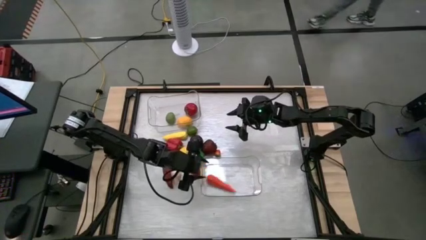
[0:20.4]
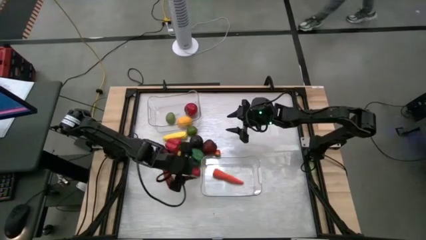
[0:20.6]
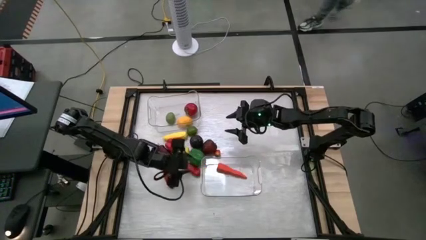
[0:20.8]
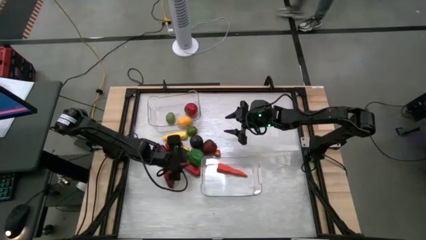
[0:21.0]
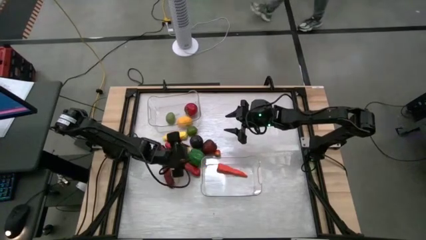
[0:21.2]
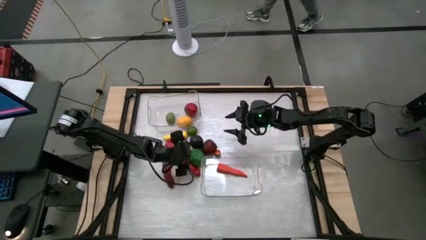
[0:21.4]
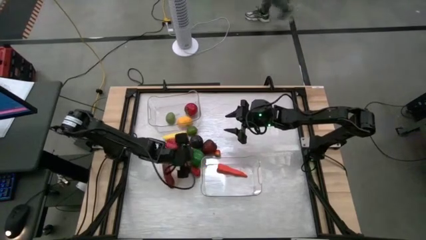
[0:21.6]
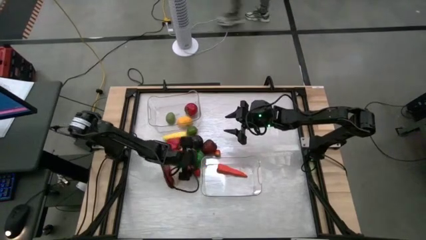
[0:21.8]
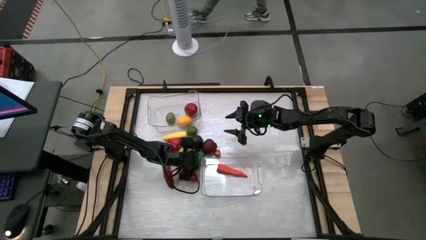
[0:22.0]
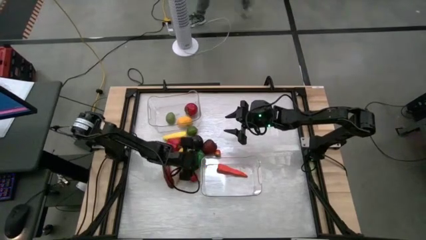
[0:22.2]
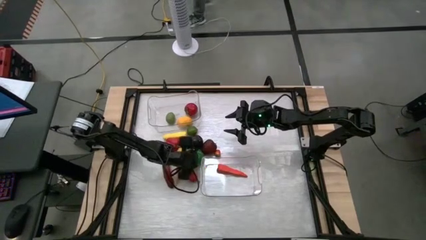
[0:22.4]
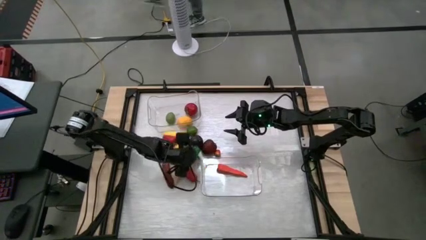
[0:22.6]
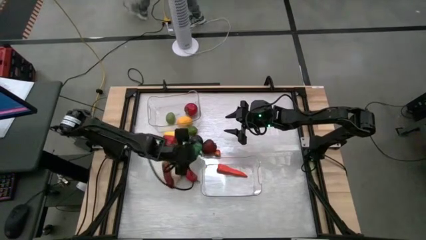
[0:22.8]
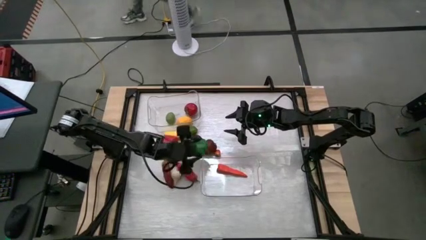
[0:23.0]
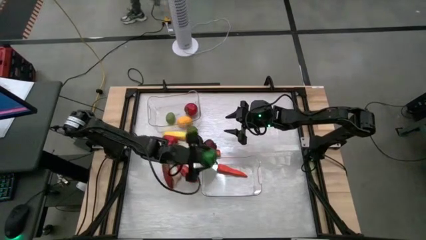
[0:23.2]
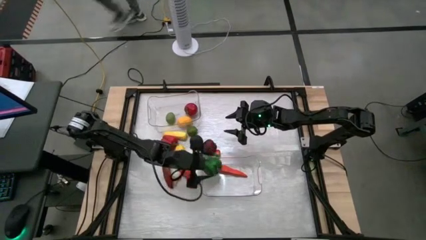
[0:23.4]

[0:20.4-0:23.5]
Task: Sort produce into baskets
Put the green bell pepper into the bottom transparent bin

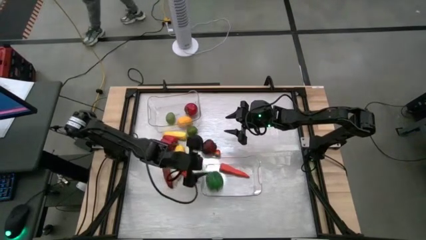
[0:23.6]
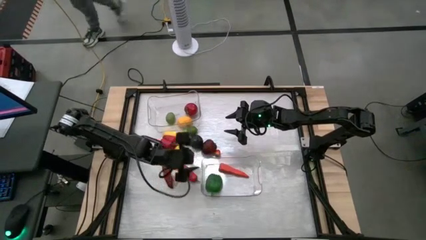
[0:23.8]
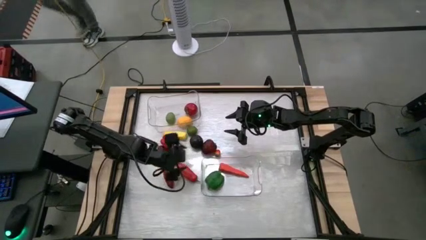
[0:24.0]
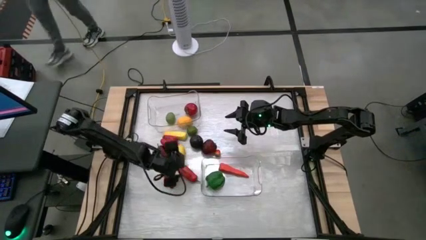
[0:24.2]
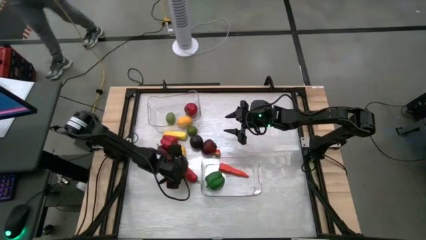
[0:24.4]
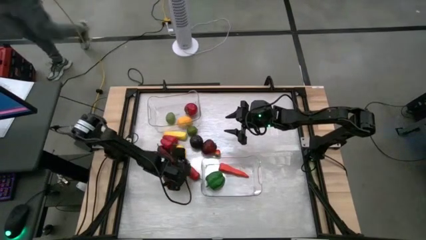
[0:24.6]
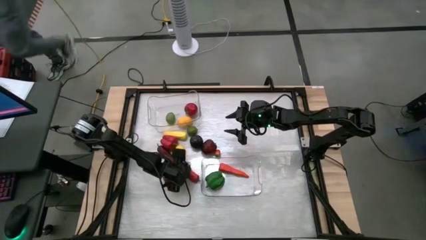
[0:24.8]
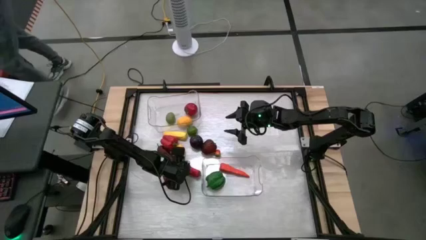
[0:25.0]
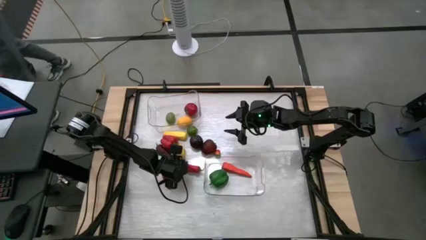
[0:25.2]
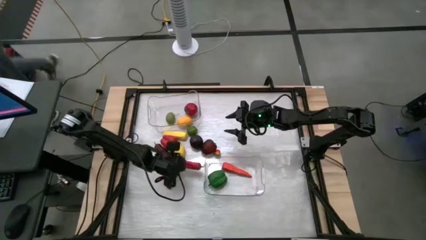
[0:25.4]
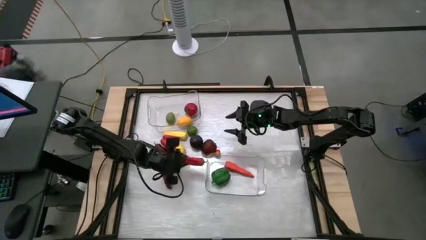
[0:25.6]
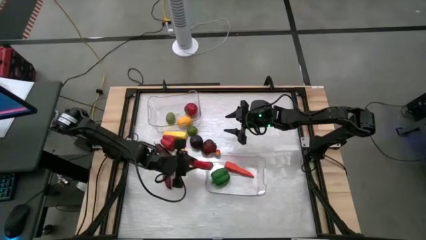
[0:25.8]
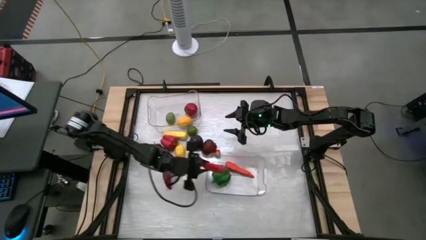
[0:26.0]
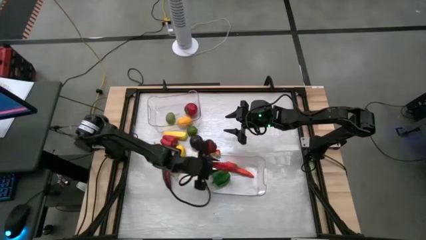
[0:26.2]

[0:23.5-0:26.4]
Put the bottom right red chili pepper into the bottom transparent bin

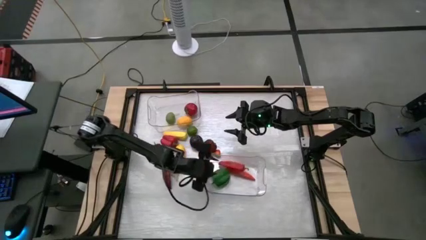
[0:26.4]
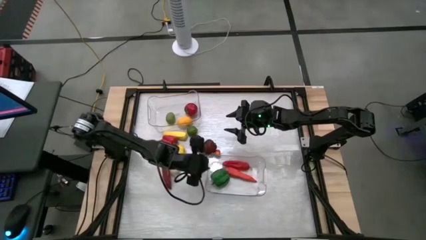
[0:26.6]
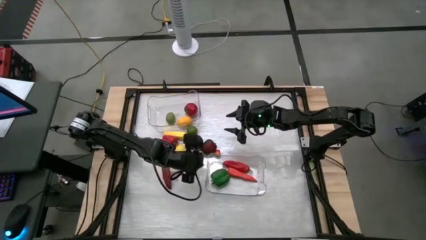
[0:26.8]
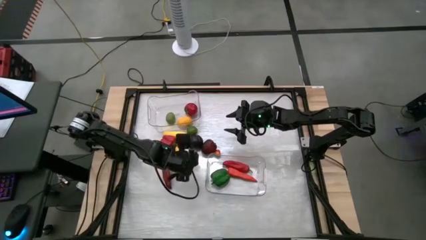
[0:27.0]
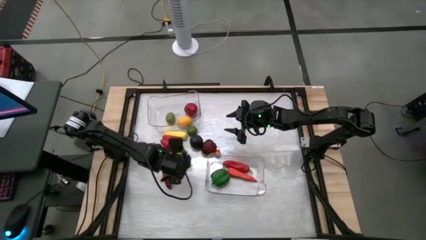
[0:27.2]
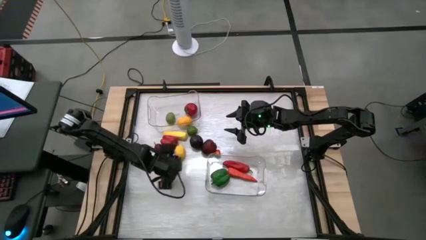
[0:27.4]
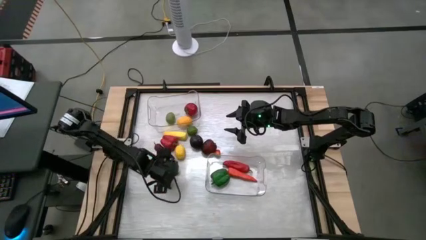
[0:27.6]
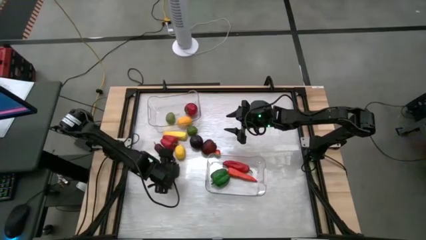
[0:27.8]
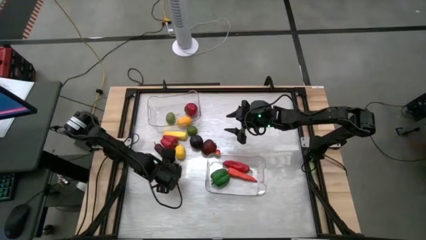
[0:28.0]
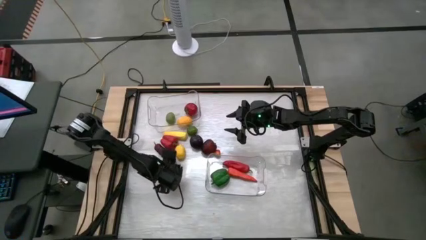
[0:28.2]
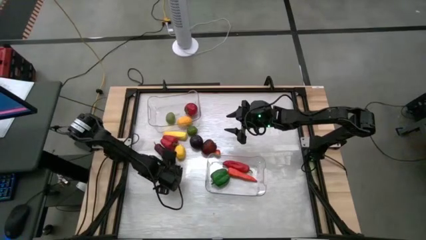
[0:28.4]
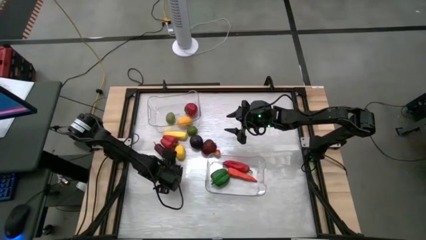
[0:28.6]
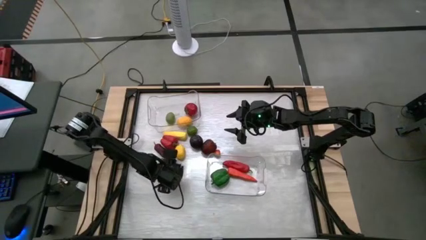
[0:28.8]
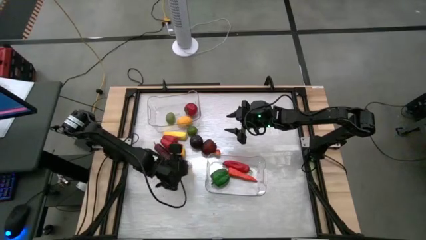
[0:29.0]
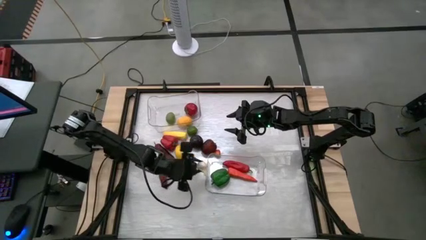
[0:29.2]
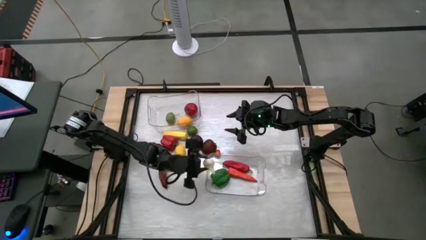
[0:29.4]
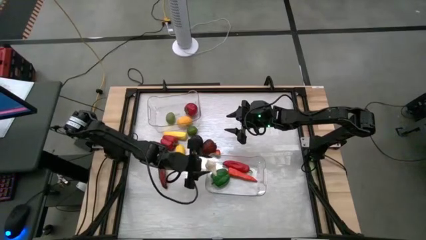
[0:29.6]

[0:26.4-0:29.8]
Put the white garlic into the bottom transparent bin

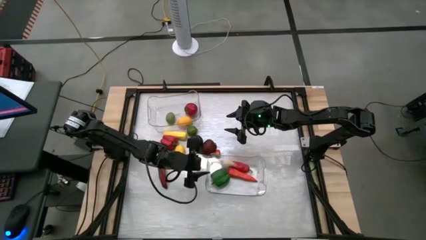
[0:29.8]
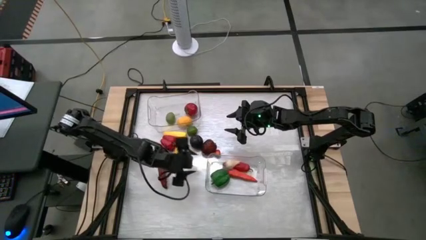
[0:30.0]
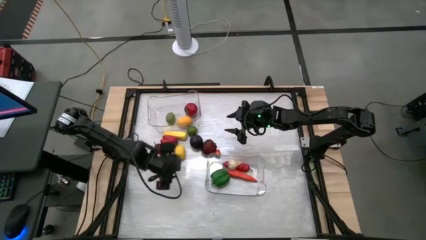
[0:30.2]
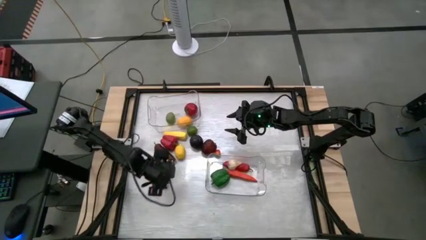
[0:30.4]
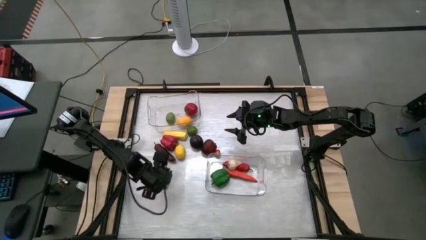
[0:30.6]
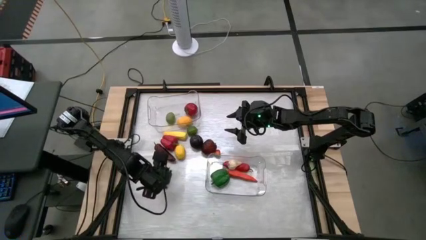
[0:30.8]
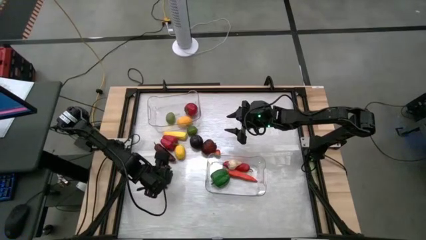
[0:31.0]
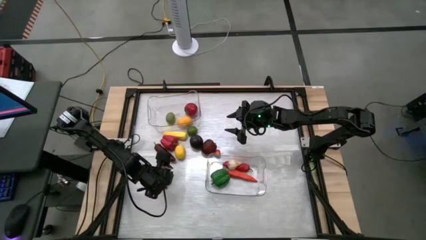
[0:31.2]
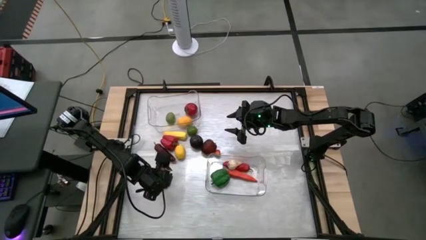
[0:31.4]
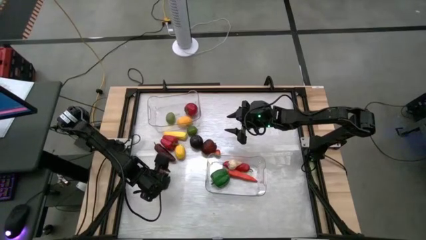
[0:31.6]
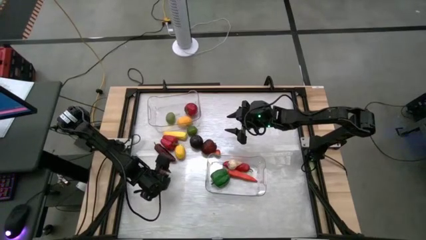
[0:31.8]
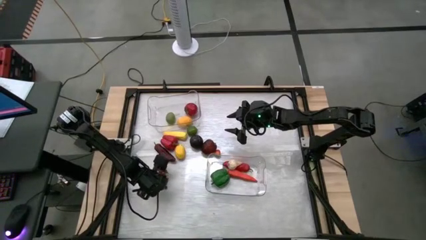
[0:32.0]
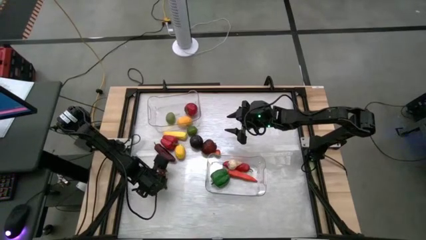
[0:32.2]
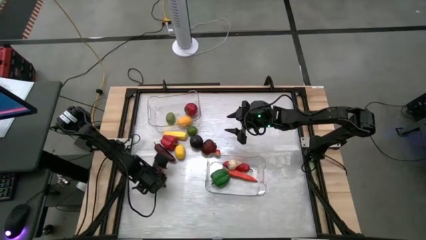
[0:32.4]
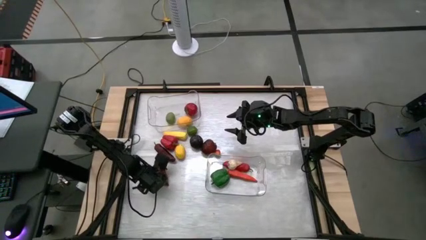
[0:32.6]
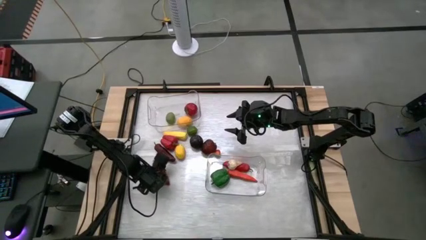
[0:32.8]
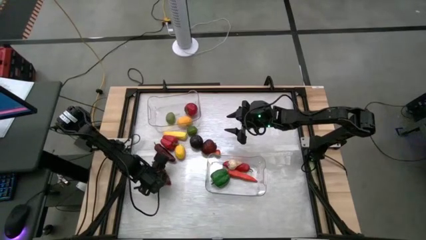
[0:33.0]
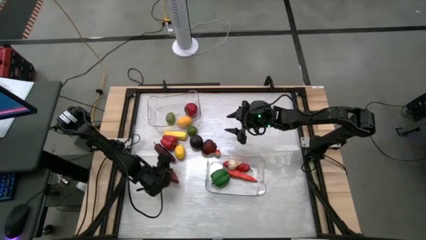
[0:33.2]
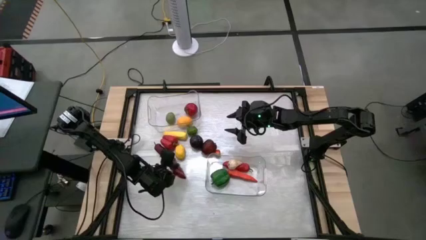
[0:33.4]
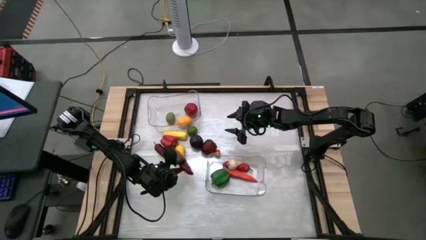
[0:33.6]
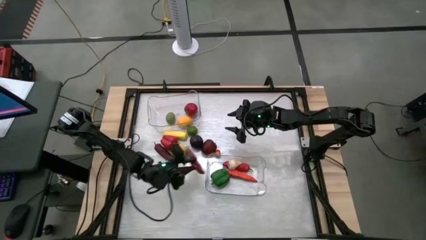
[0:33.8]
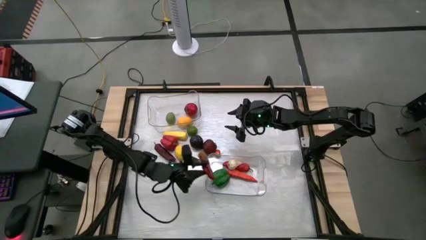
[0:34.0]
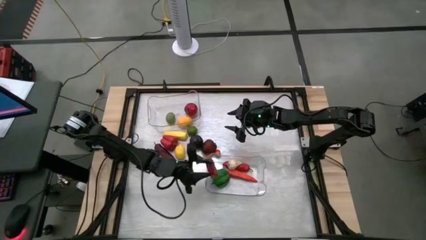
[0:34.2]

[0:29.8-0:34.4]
Put the bottom red chili pepper into the bottom transparent bin

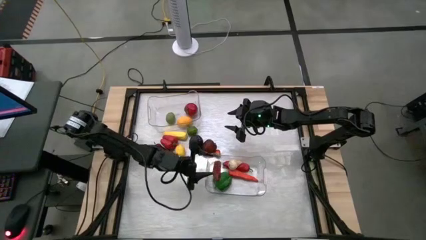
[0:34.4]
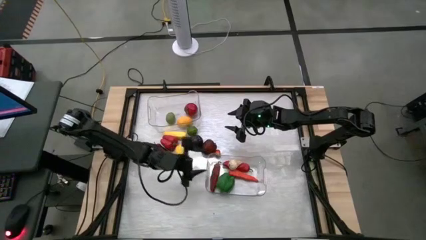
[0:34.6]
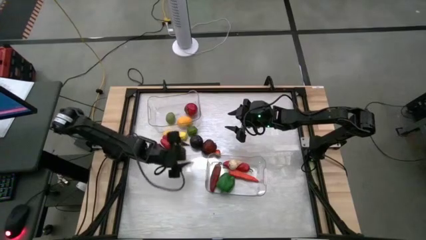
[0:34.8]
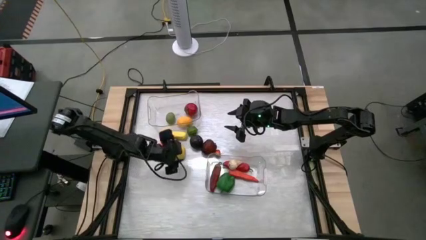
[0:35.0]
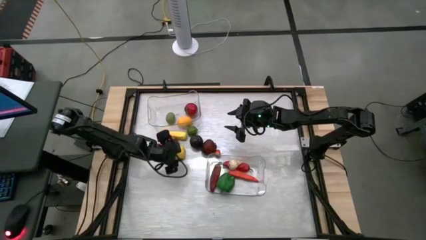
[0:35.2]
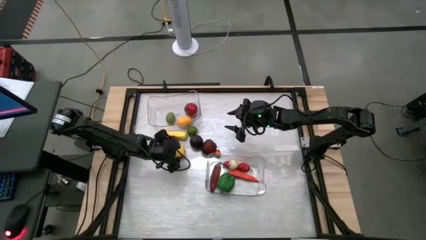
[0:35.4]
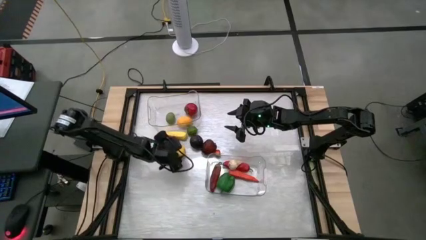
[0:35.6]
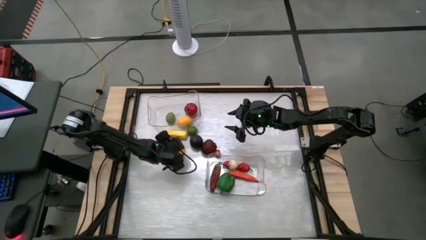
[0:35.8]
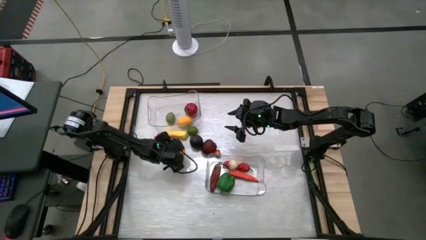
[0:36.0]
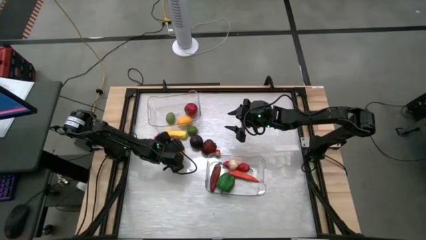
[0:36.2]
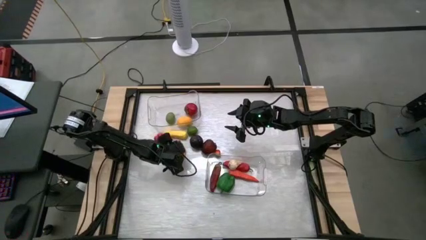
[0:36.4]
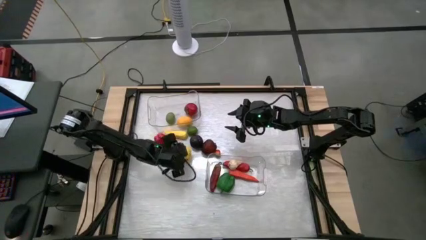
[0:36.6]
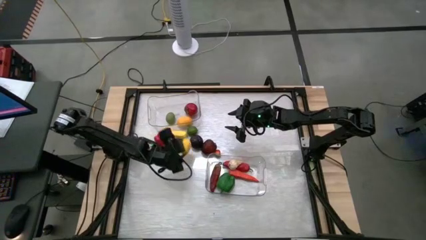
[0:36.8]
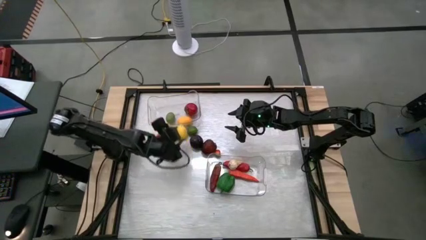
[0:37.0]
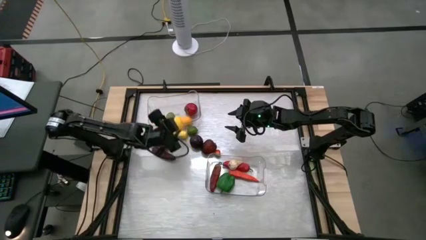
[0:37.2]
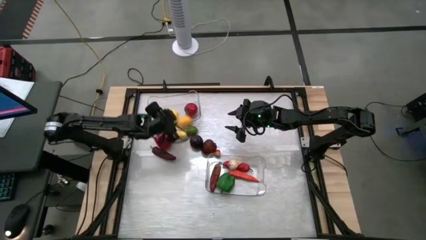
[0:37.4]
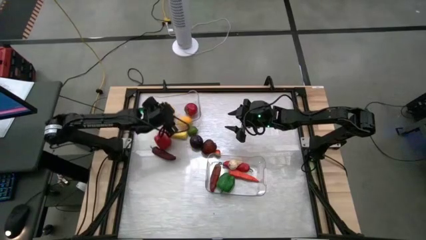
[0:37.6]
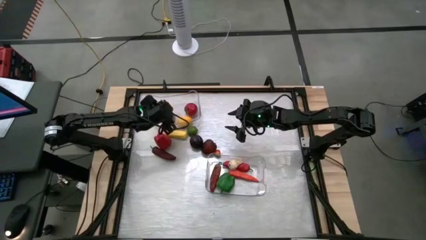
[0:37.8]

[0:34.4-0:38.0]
Put the yellow lemon into the top transparent bin
